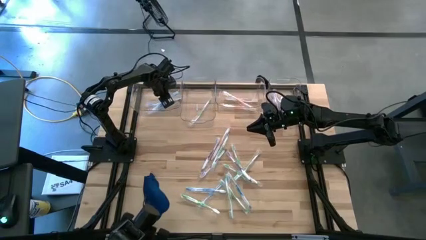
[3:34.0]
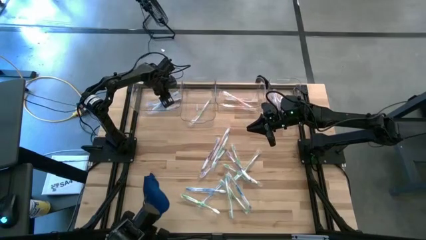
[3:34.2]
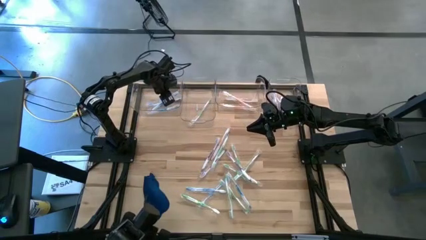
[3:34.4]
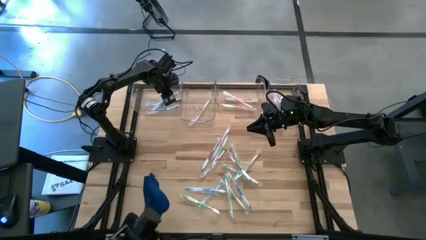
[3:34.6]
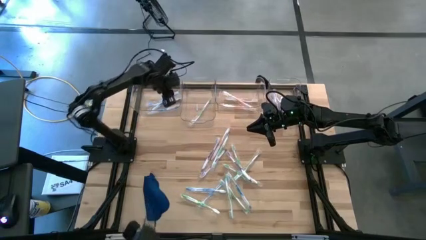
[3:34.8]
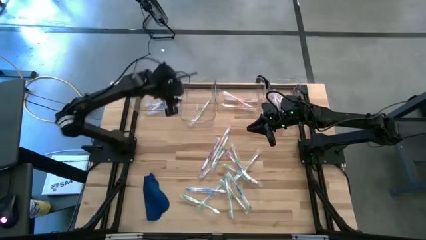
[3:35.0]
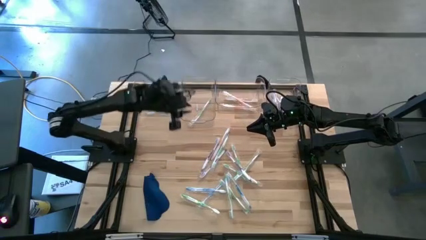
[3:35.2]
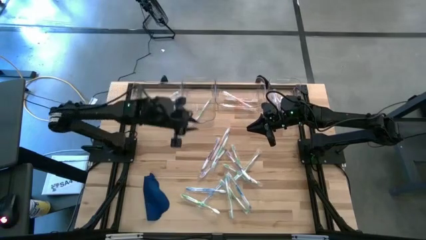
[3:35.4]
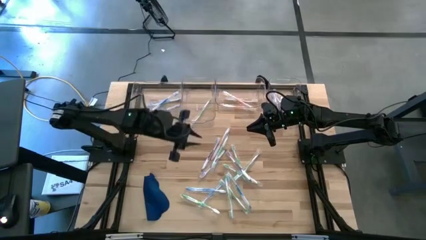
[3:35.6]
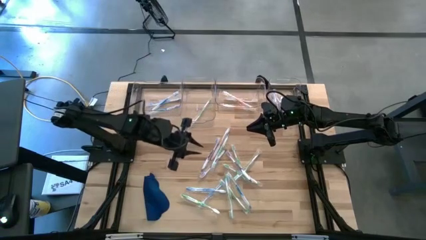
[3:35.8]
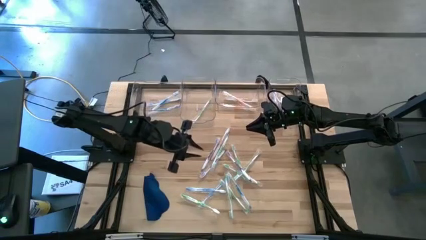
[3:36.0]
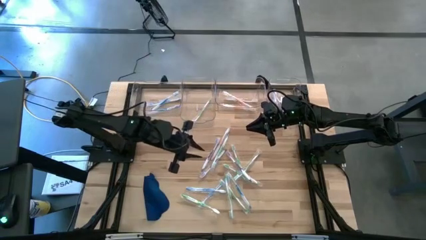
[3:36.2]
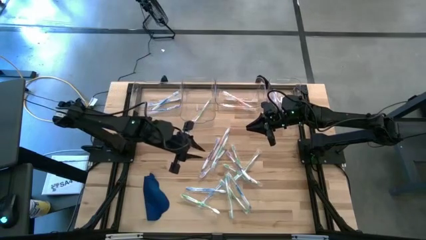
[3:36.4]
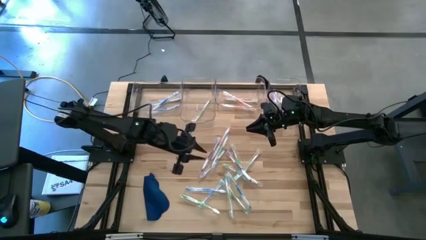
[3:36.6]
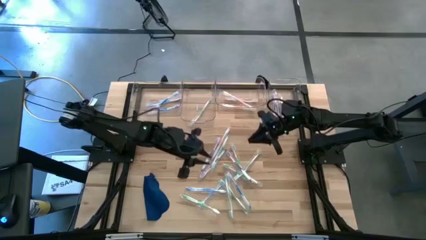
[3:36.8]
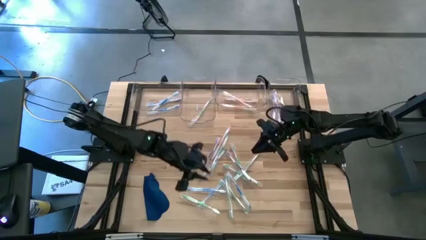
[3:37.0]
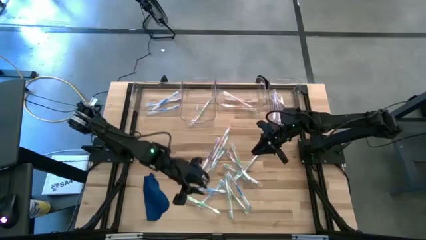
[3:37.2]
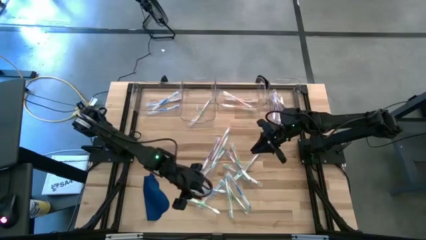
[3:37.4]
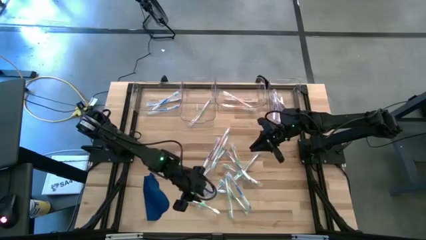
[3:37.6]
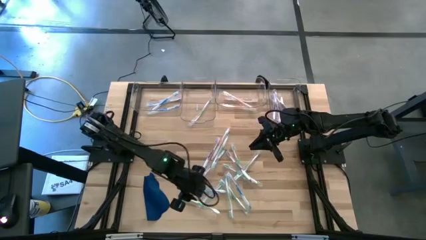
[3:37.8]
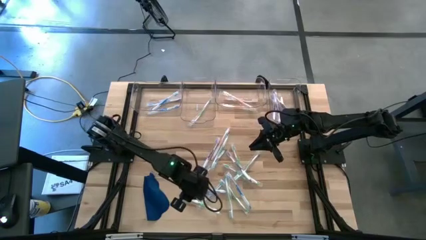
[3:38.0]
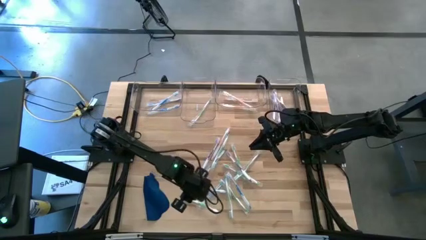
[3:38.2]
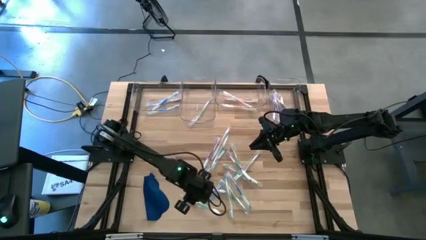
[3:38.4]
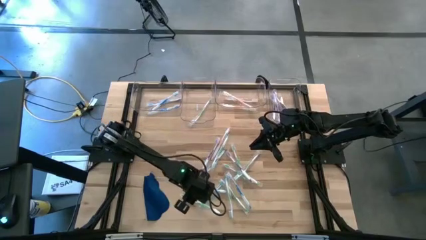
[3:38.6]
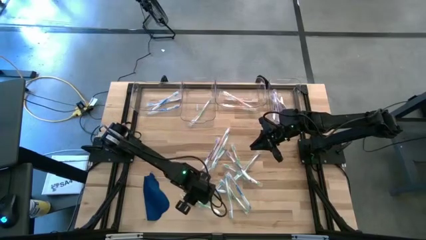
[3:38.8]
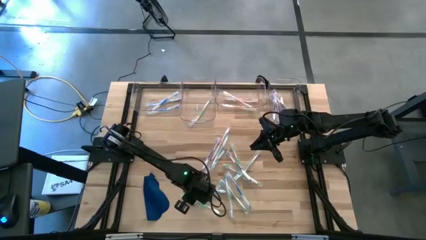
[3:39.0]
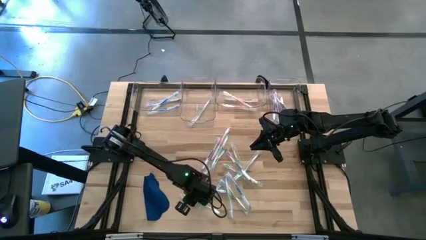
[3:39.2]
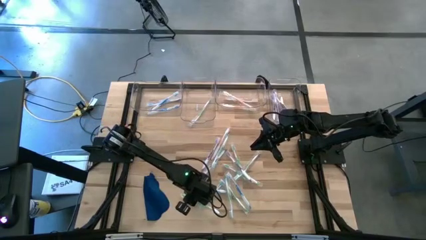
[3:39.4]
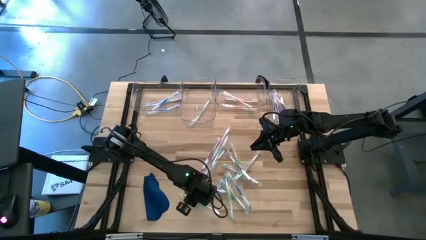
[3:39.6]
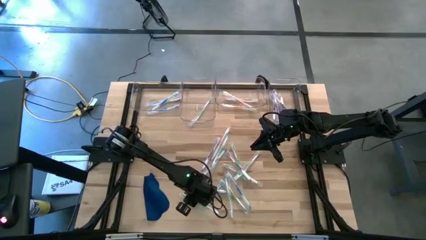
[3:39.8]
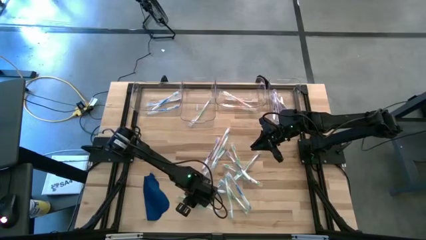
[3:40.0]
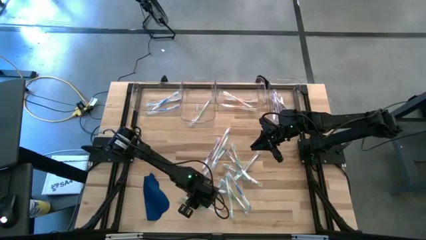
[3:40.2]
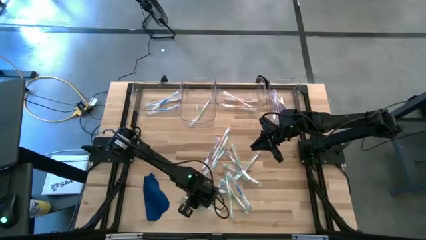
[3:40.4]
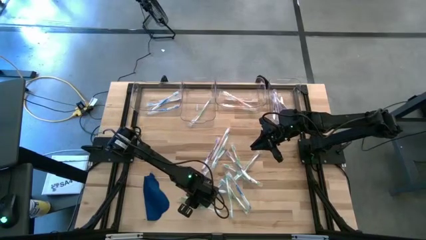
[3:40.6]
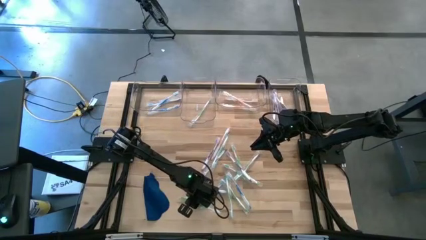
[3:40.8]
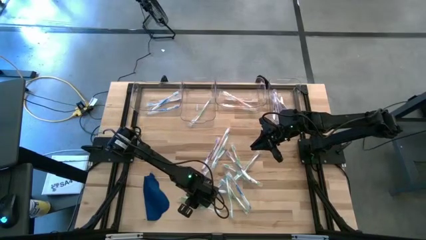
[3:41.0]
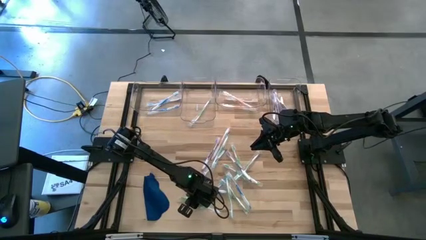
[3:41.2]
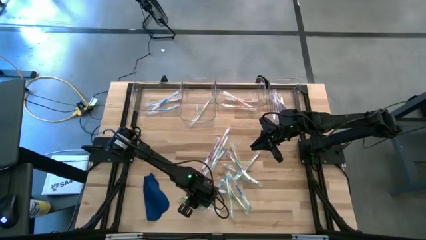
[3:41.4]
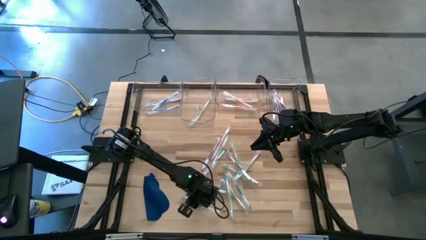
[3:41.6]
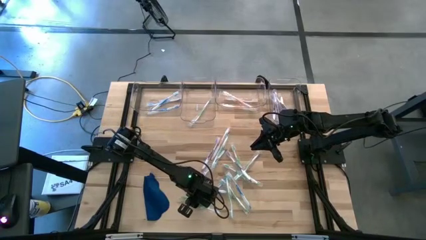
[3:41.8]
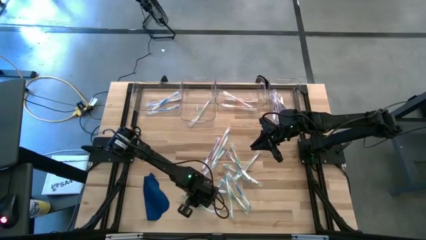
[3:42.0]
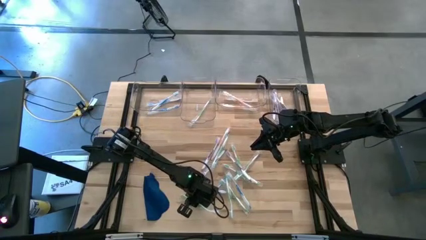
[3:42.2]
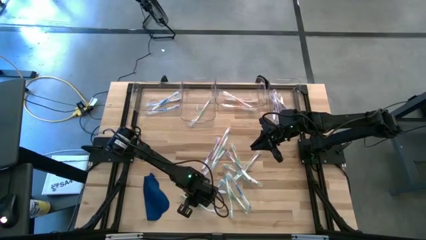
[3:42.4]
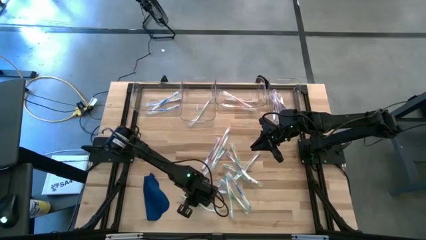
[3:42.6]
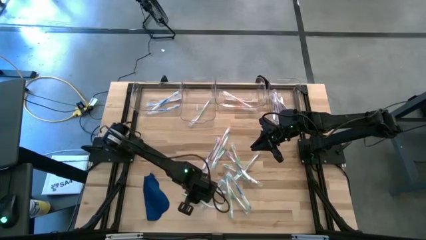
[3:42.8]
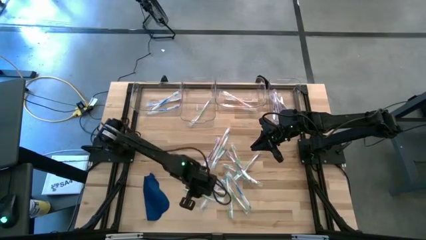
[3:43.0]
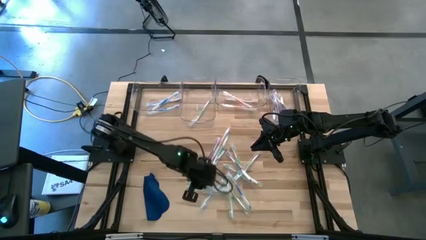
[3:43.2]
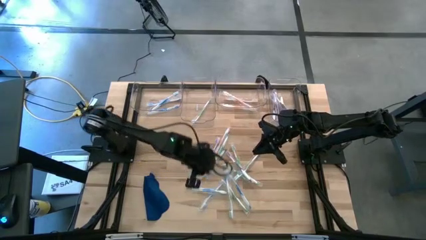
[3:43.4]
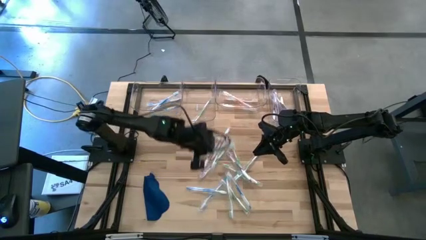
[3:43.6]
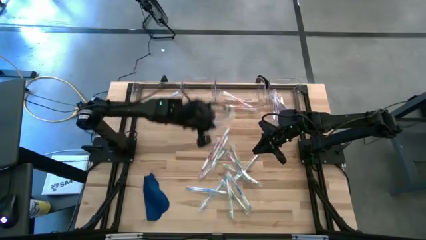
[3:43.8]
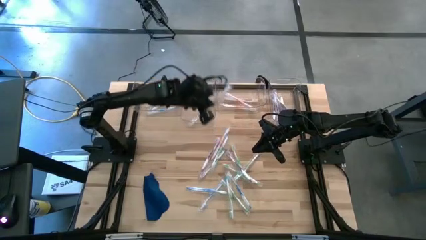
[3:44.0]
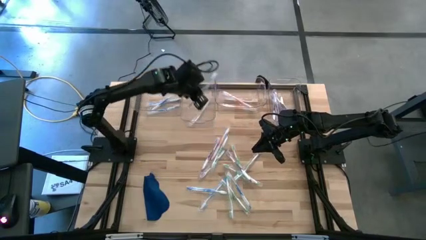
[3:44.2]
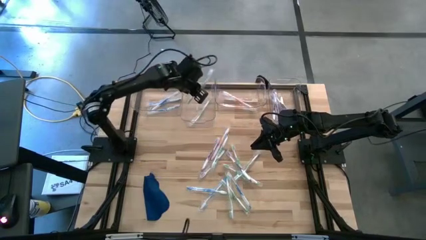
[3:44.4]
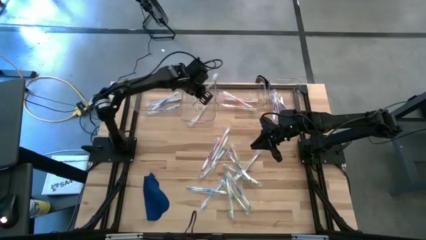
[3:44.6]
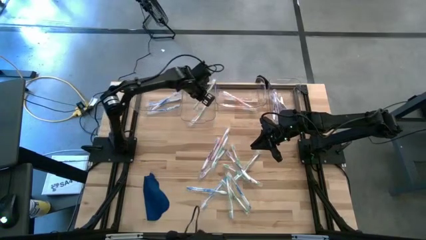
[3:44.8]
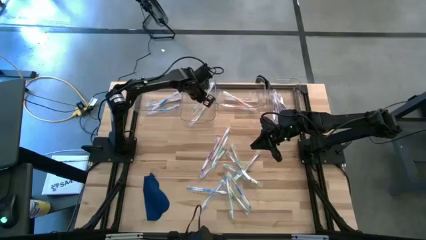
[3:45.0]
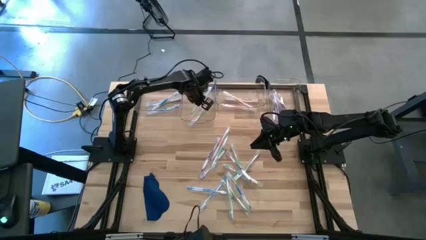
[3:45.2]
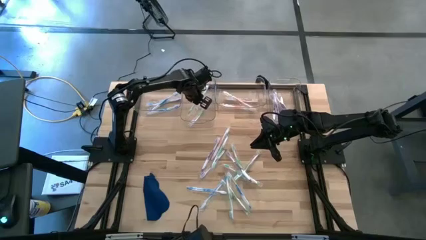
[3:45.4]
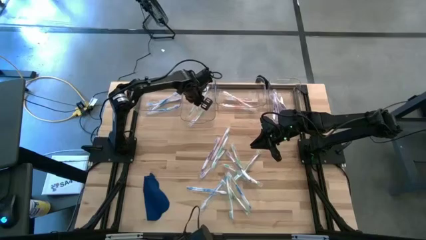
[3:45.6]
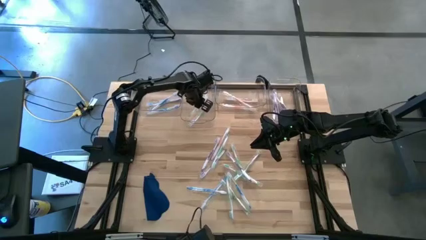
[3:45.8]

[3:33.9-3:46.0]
Task: Pick & Place Toothbrushes
Put the green toothbrush into the middle left transparent bin

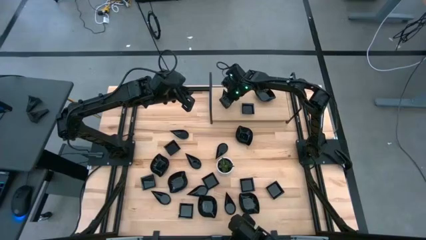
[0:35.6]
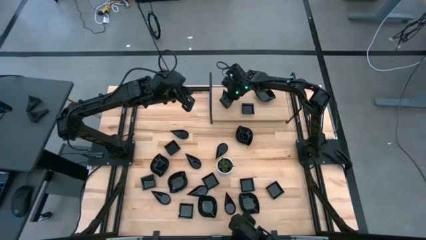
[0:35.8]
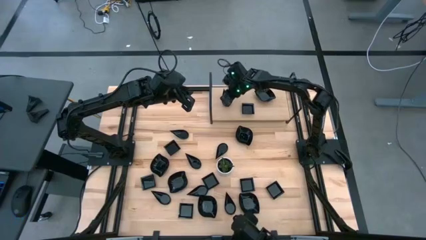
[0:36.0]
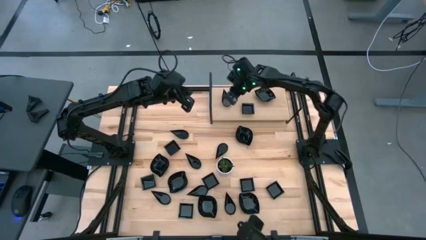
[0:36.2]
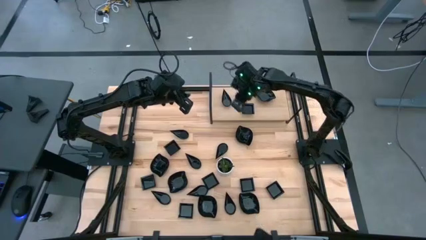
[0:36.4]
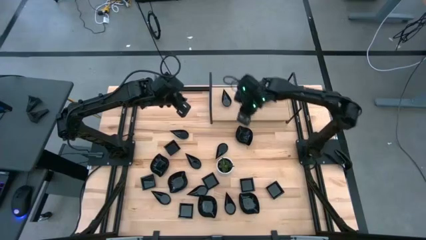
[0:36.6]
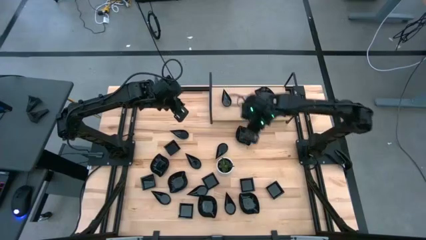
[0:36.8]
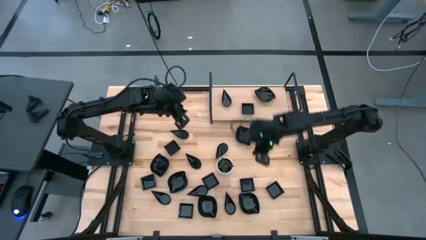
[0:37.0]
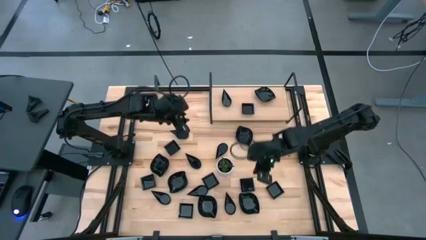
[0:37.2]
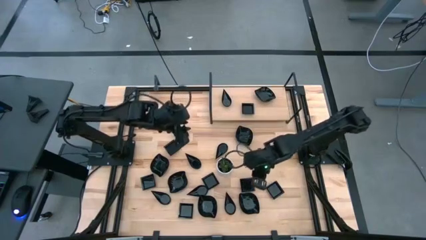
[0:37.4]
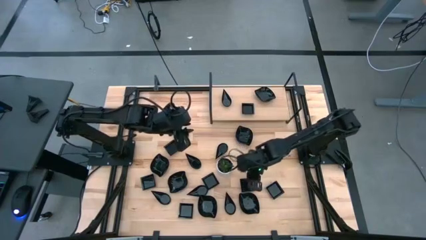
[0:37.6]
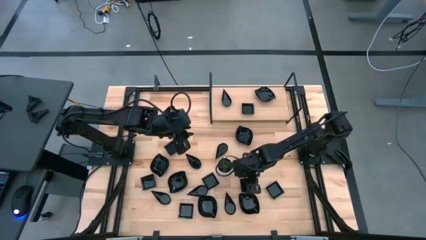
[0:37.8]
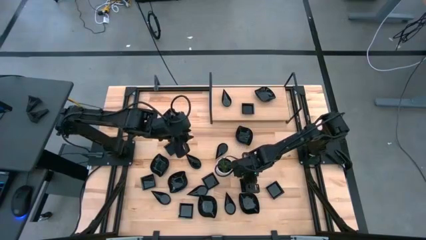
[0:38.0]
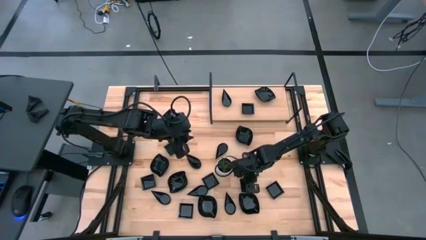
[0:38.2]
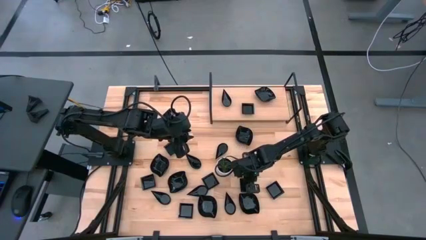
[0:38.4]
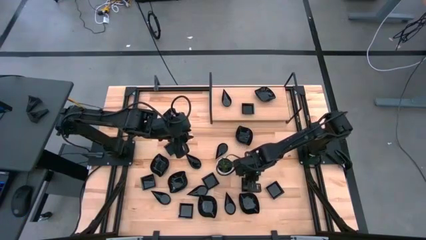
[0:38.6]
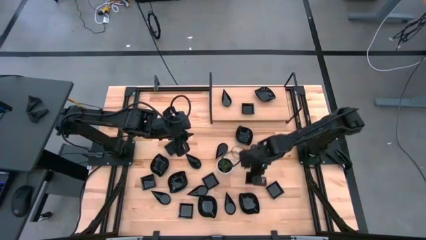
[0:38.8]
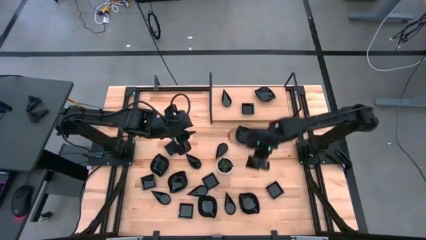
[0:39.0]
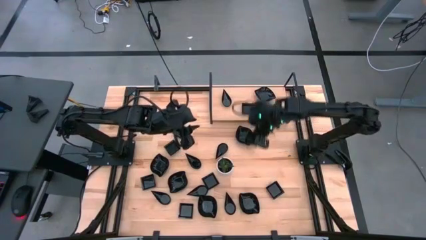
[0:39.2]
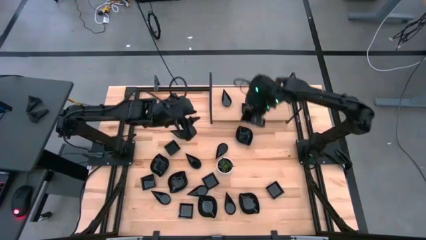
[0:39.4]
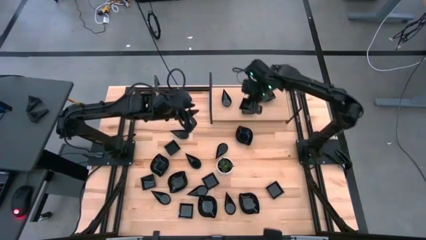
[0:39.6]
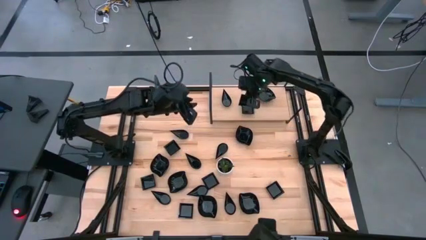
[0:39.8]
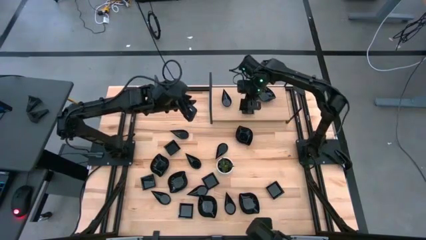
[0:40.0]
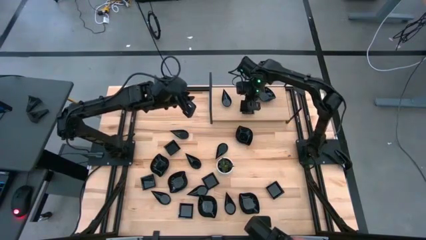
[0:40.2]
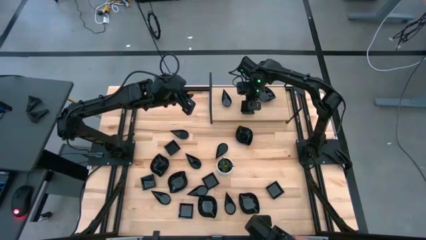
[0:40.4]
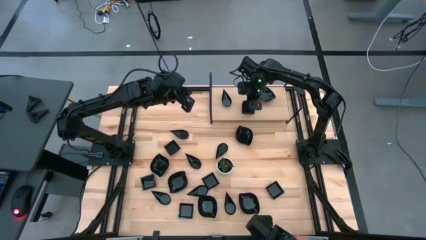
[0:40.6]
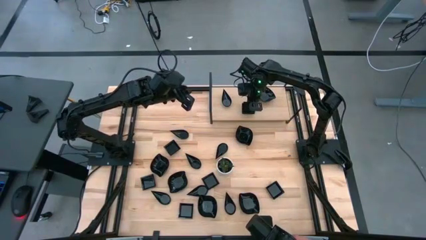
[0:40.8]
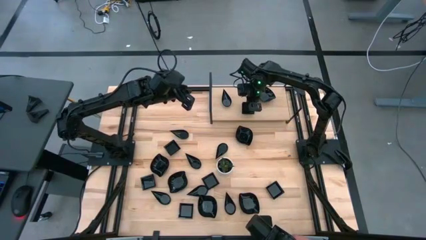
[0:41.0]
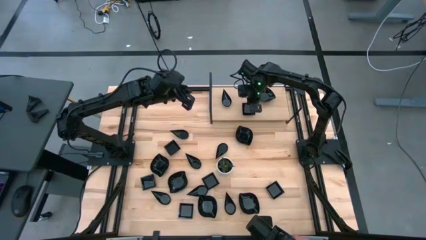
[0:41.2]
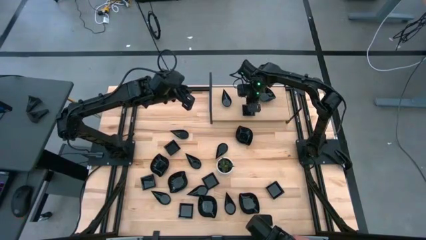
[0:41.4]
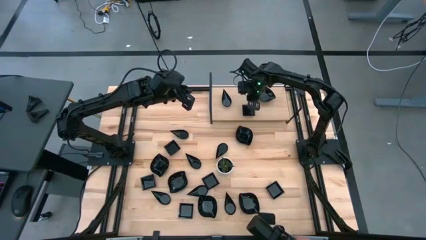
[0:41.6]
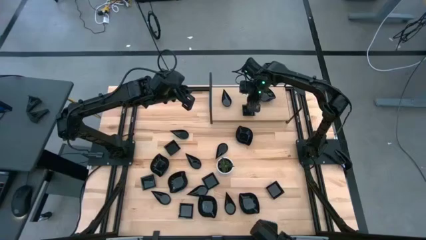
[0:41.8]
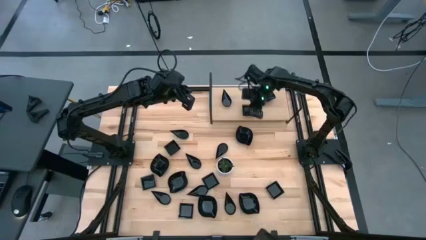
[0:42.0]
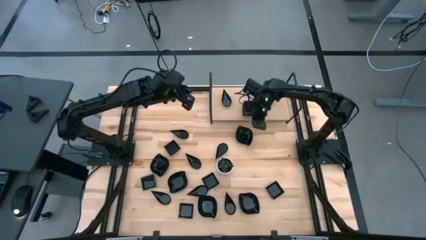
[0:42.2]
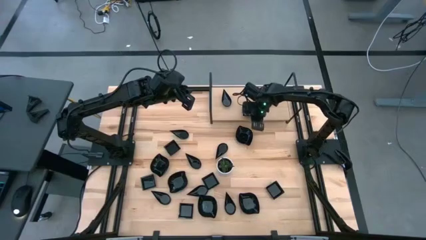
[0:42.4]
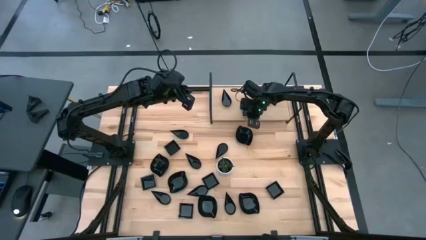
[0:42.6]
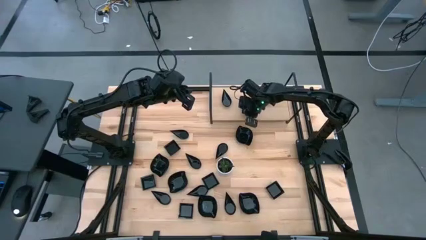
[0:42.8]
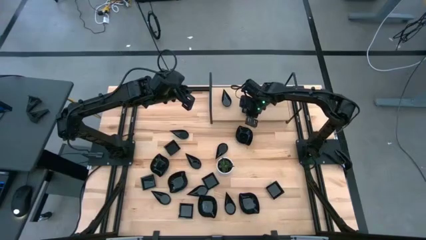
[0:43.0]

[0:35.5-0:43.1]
Task: Pick & Place Mini shaped plates
Stack the square plate on top of the square plate on the shelf
